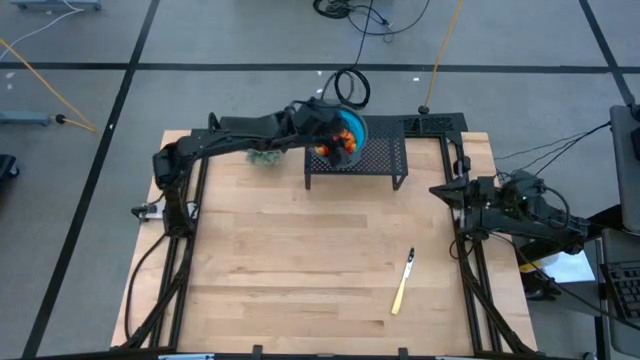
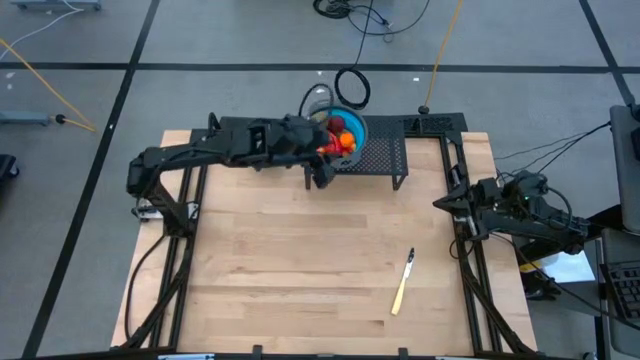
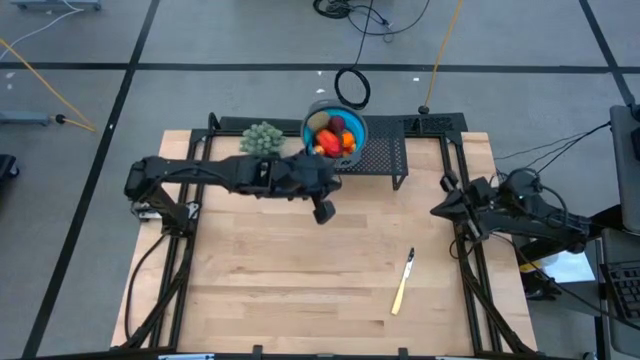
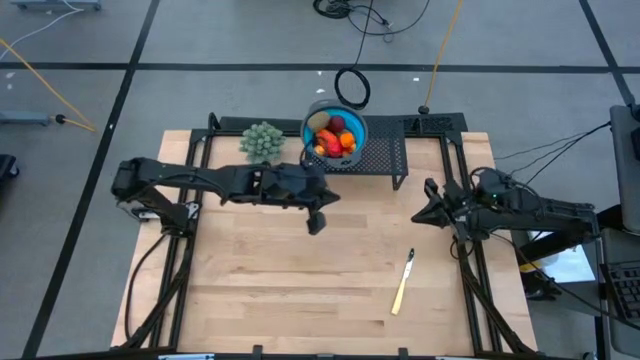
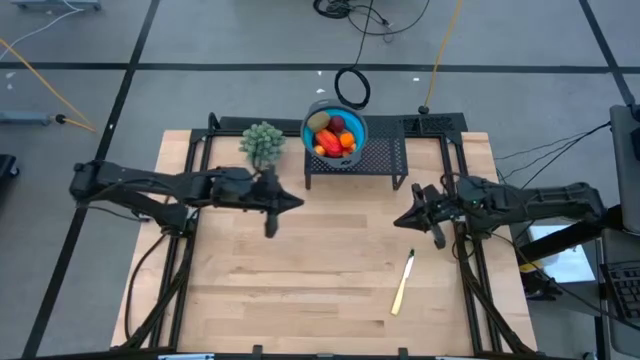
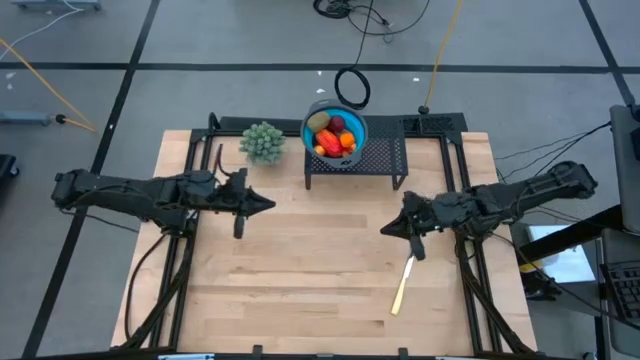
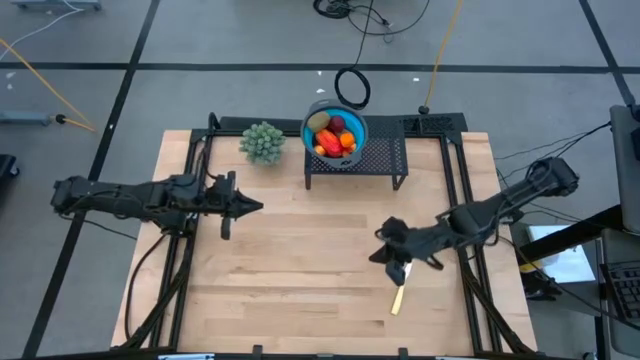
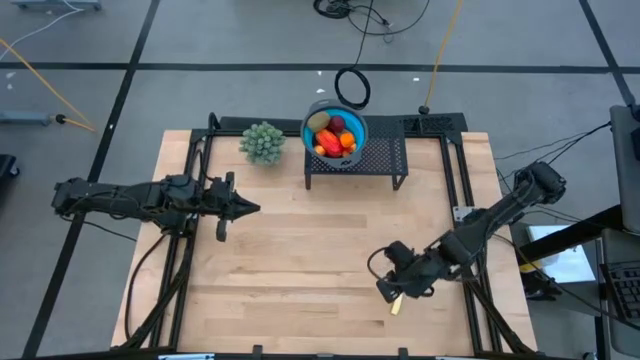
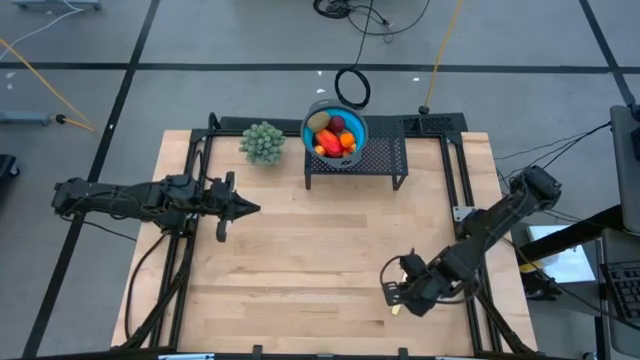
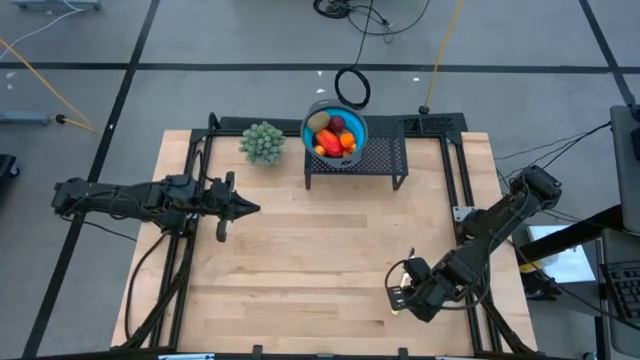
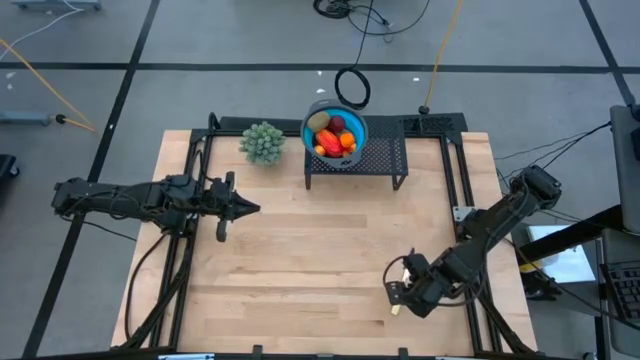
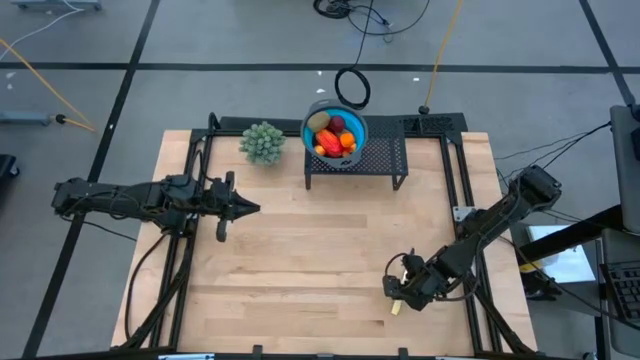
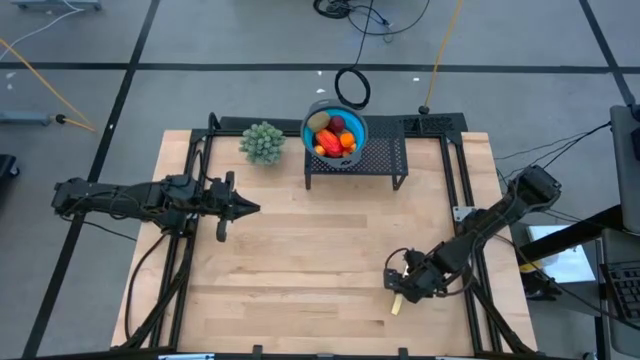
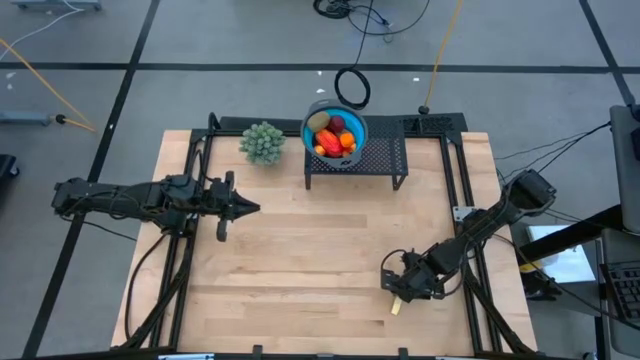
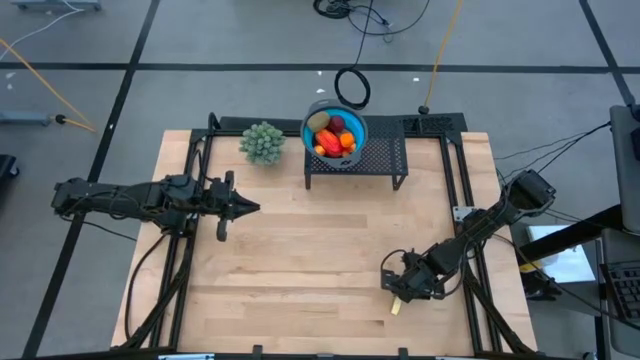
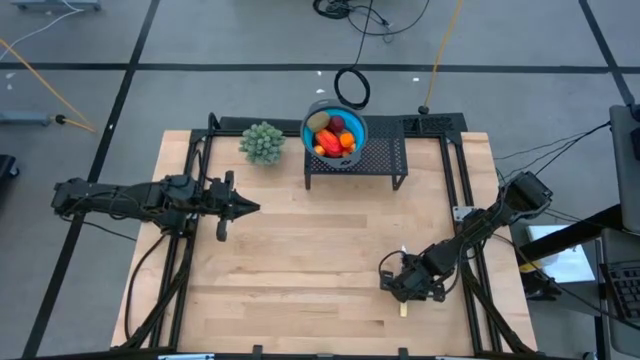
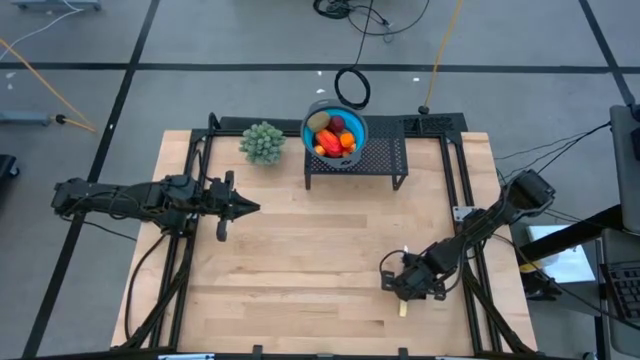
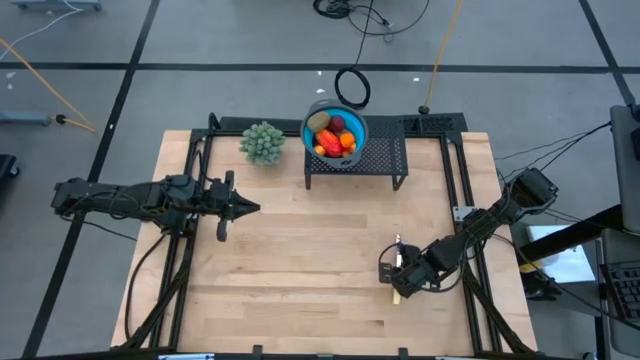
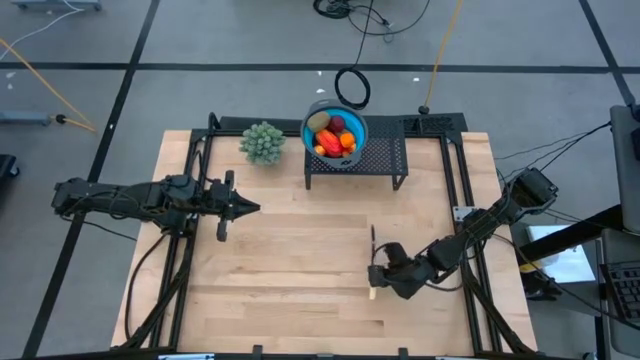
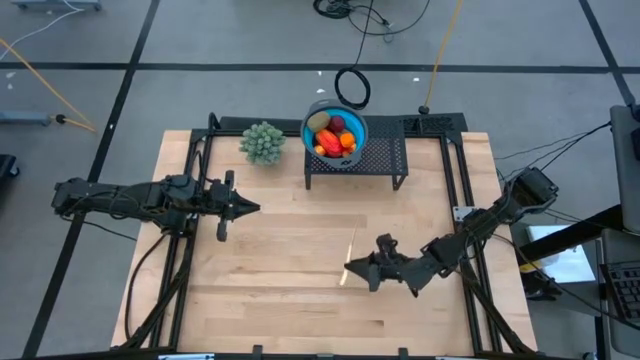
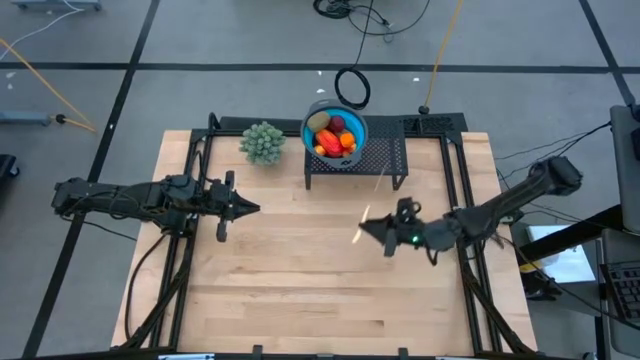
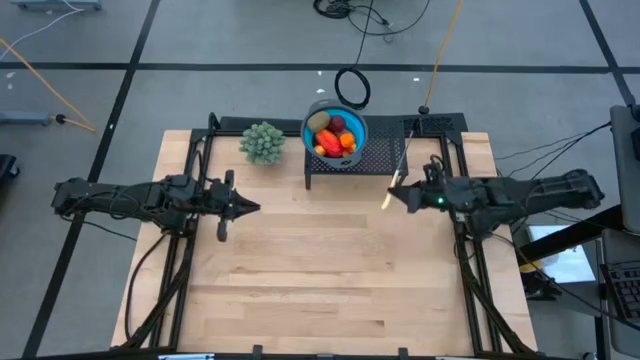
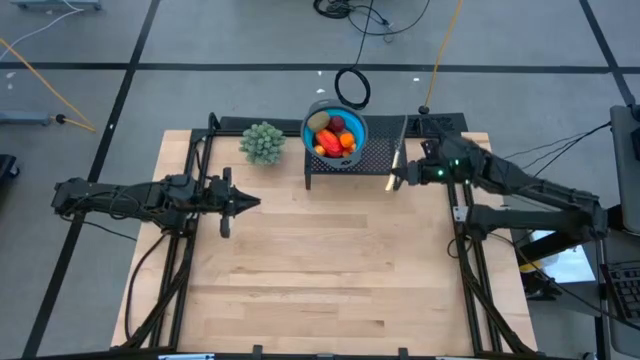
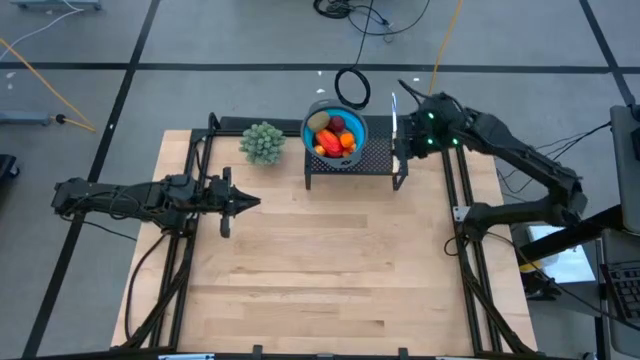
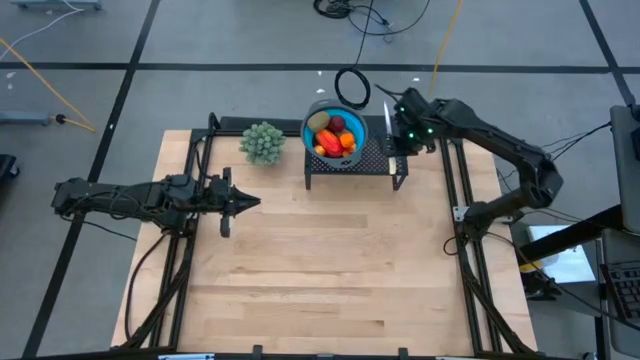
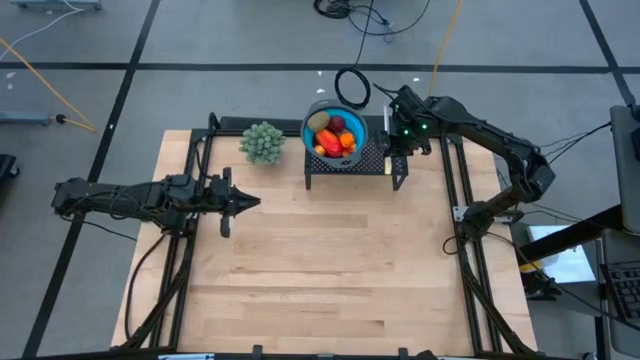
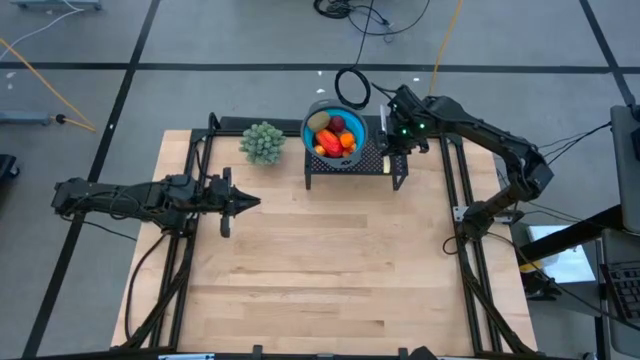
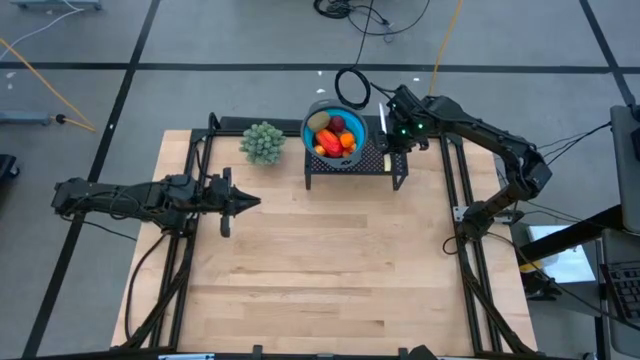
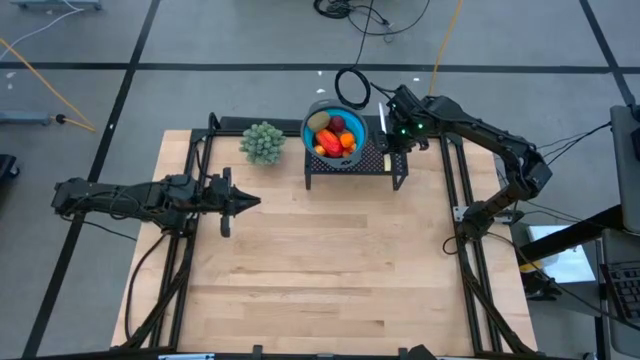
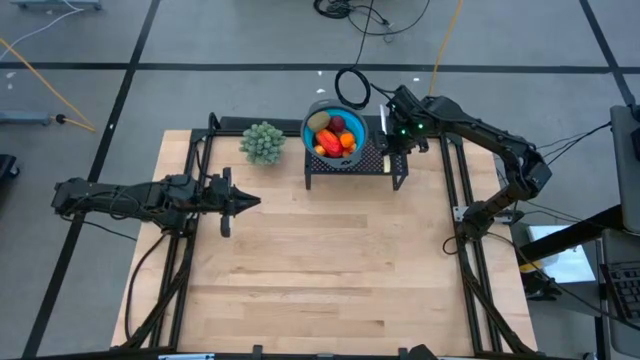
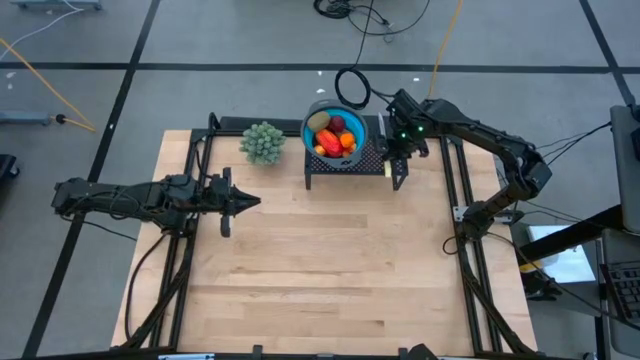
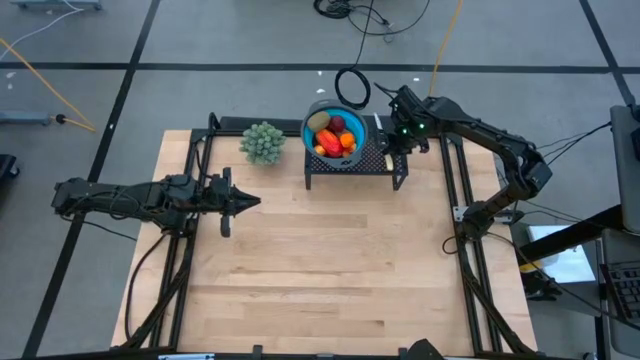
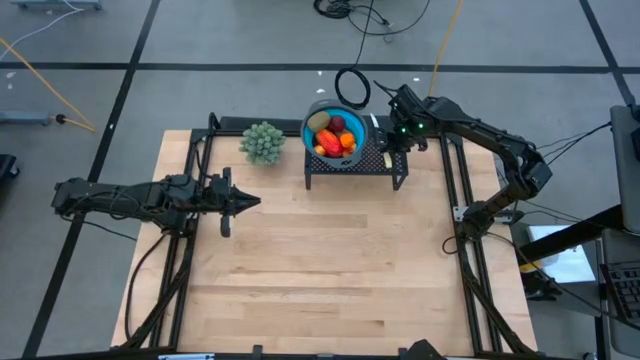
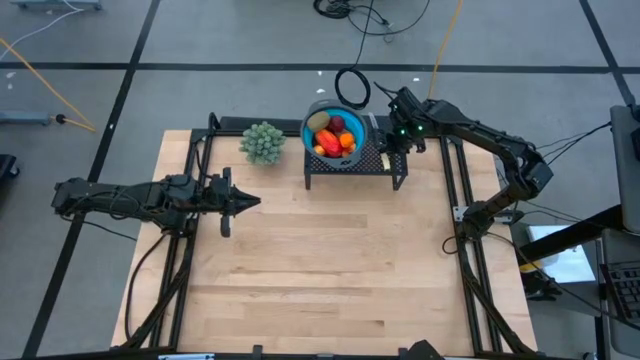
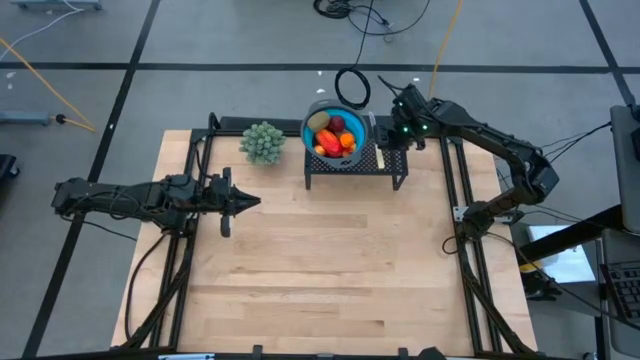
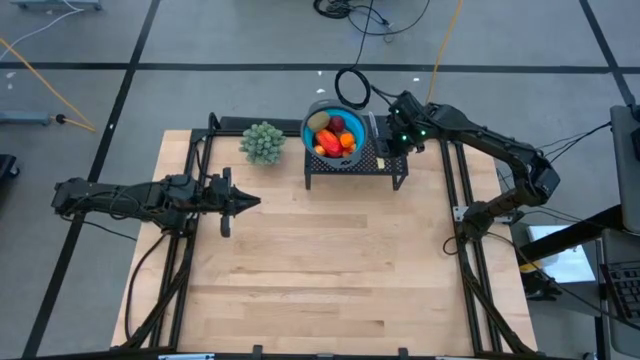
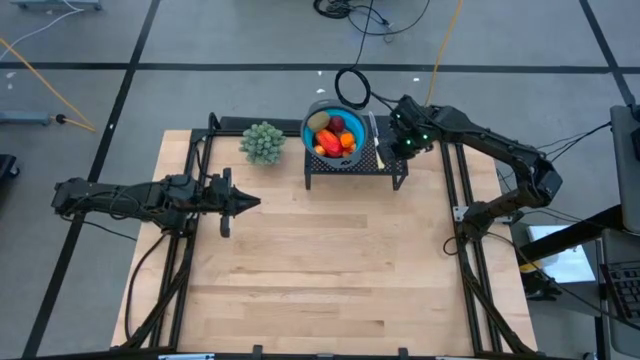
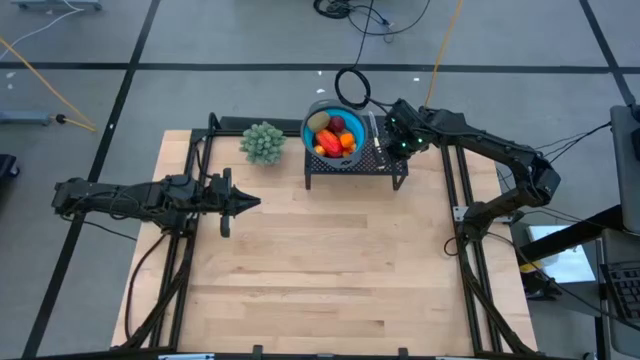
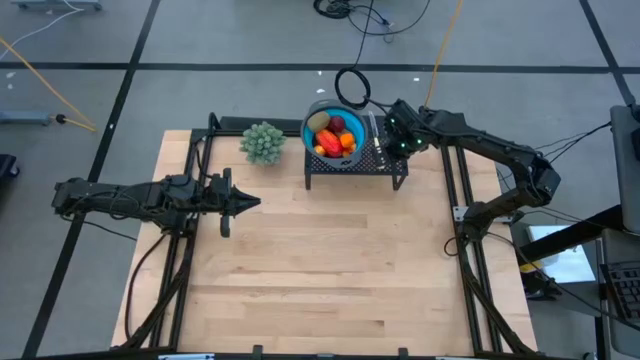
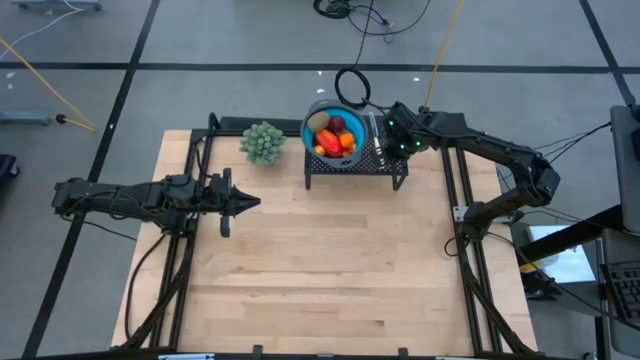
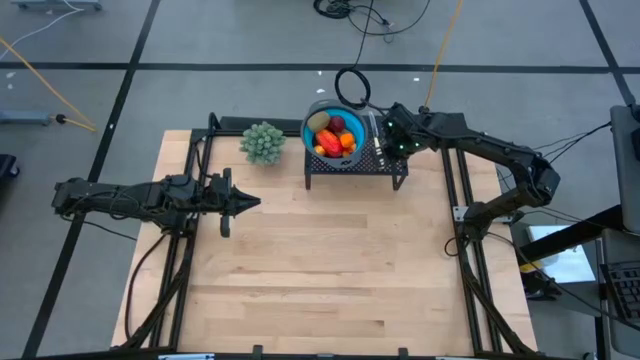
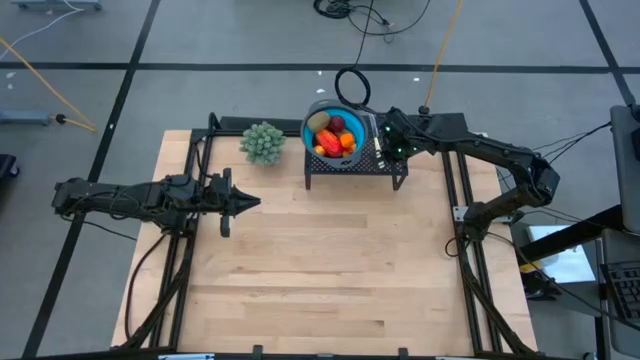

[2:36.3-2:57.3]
Task: Pick & Place Fruit
Put the yellow table knife on the shelf
